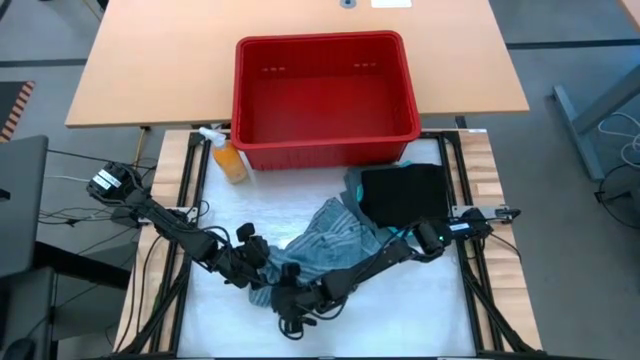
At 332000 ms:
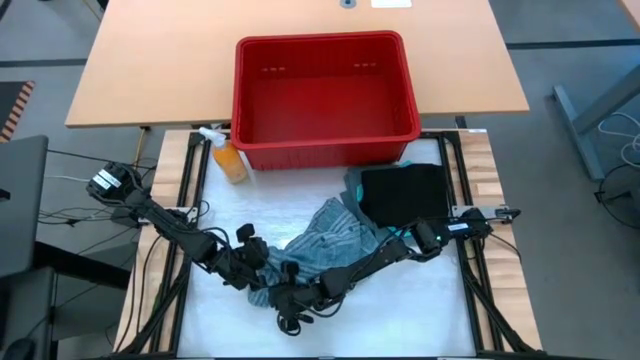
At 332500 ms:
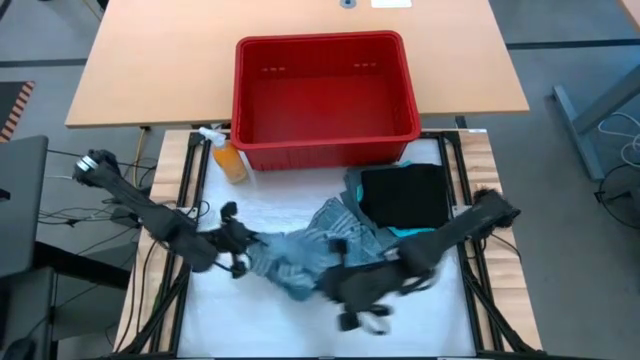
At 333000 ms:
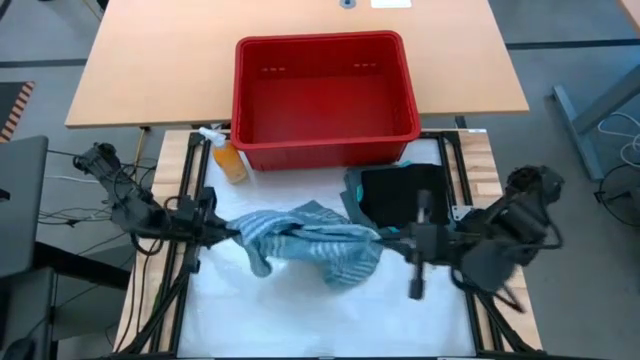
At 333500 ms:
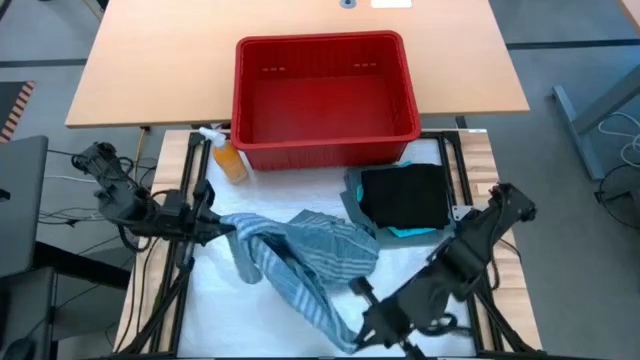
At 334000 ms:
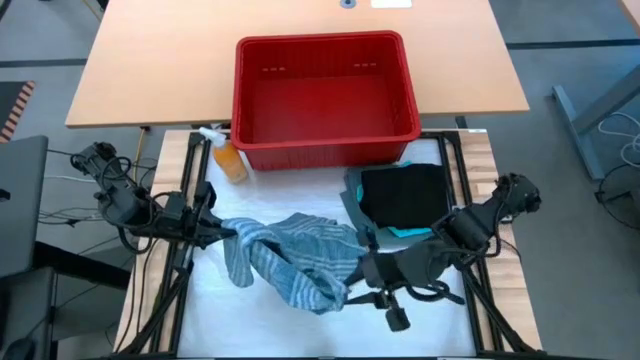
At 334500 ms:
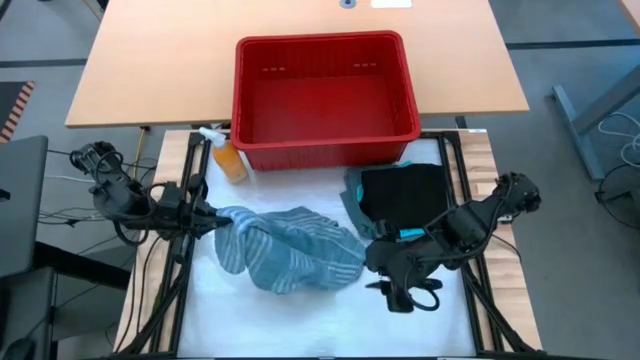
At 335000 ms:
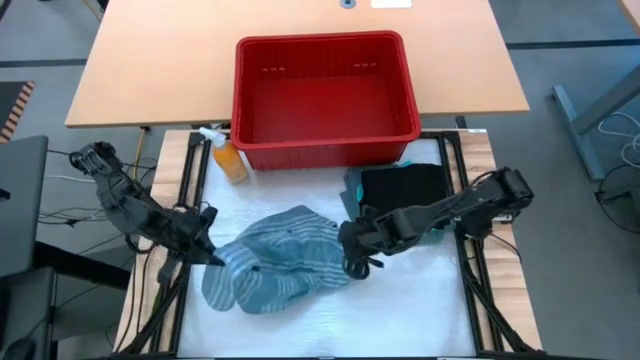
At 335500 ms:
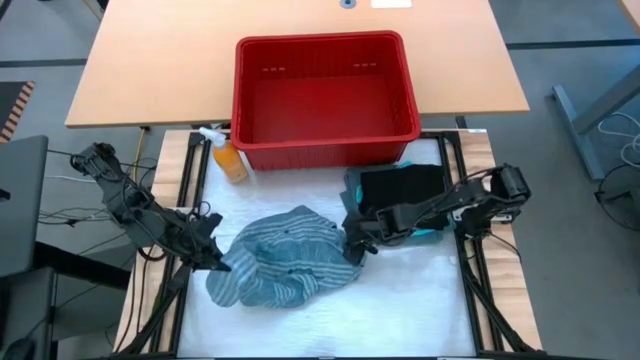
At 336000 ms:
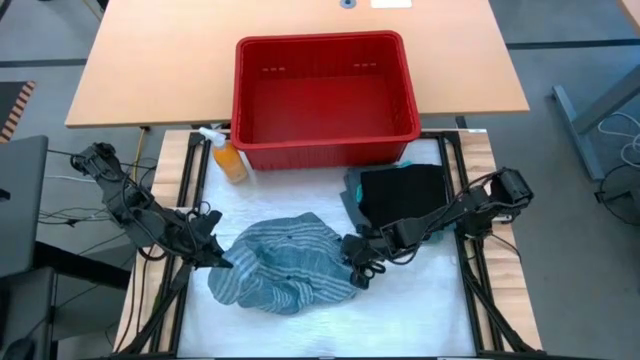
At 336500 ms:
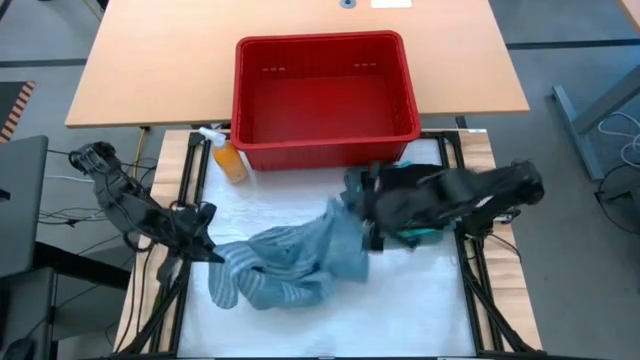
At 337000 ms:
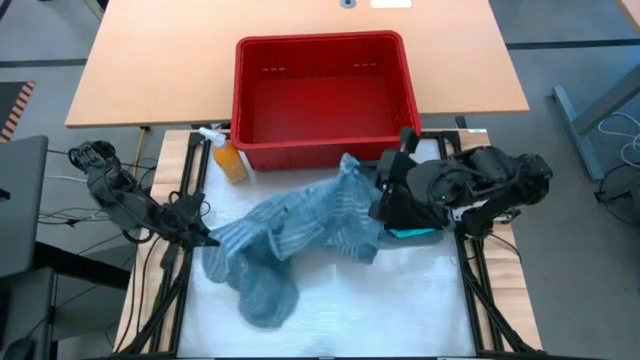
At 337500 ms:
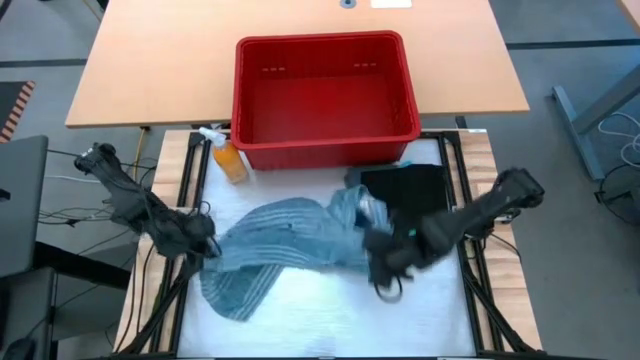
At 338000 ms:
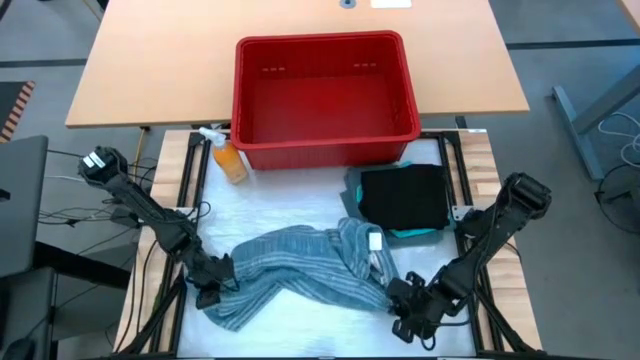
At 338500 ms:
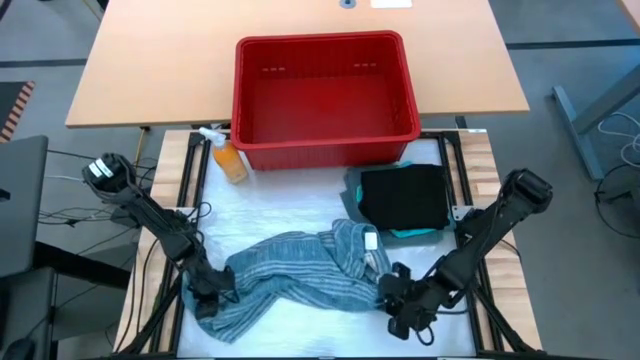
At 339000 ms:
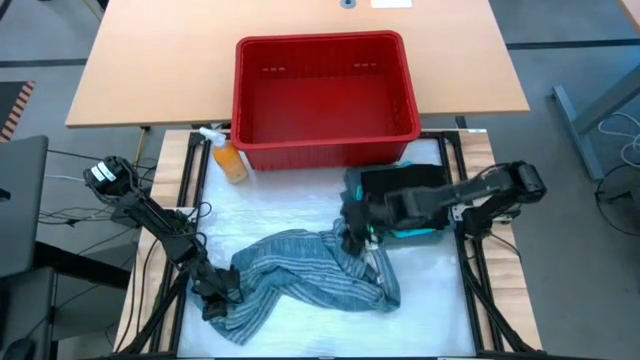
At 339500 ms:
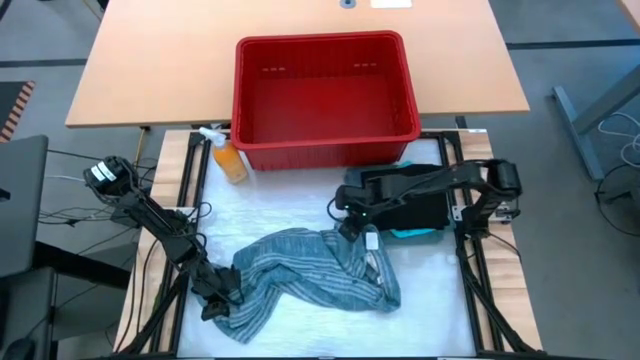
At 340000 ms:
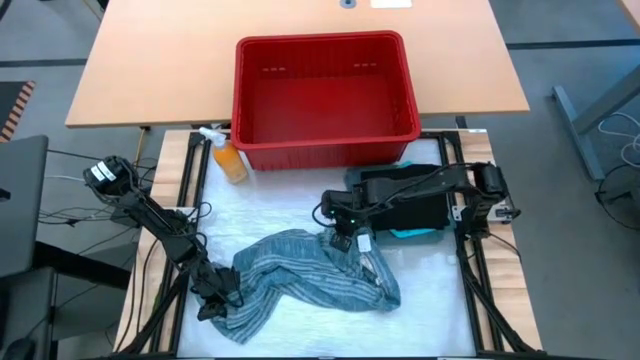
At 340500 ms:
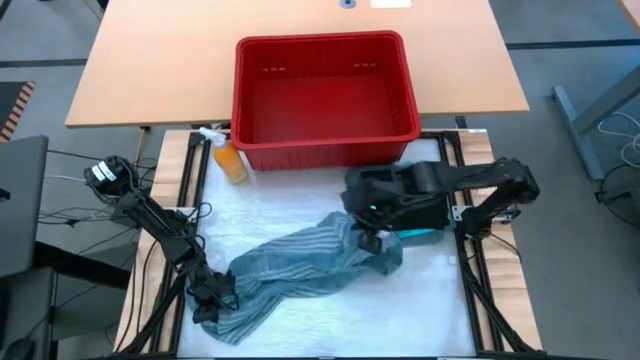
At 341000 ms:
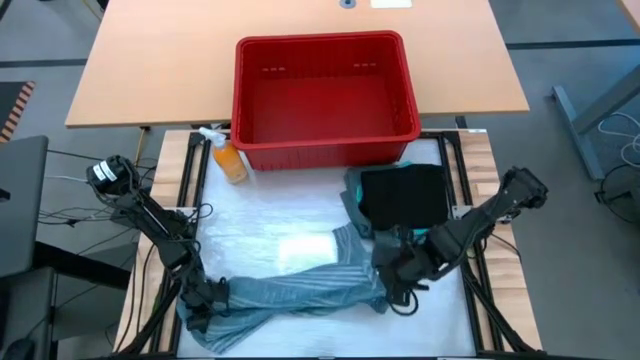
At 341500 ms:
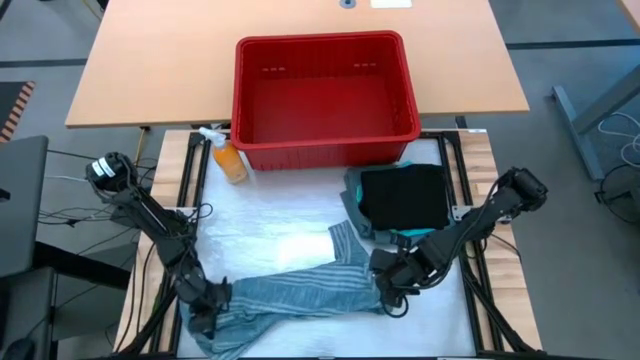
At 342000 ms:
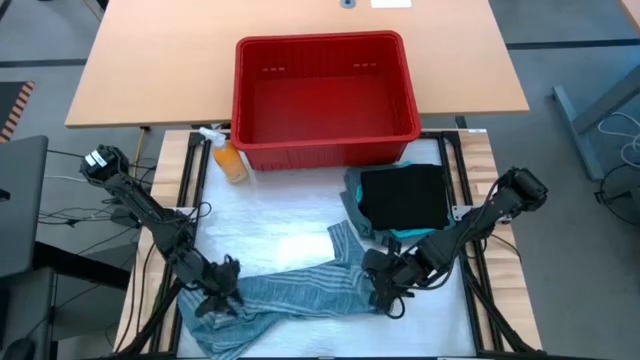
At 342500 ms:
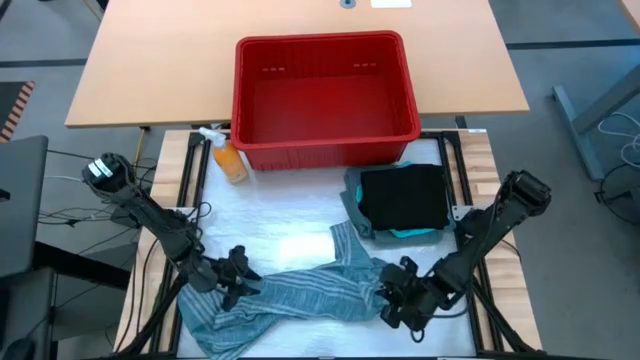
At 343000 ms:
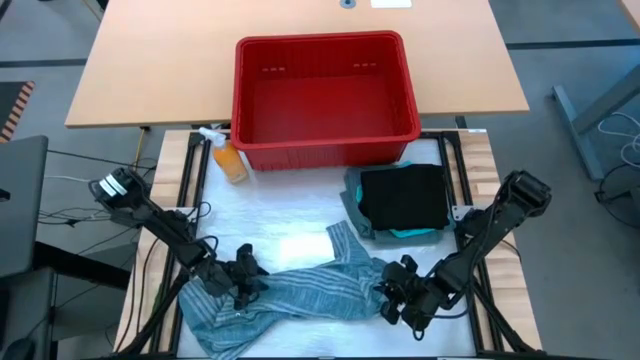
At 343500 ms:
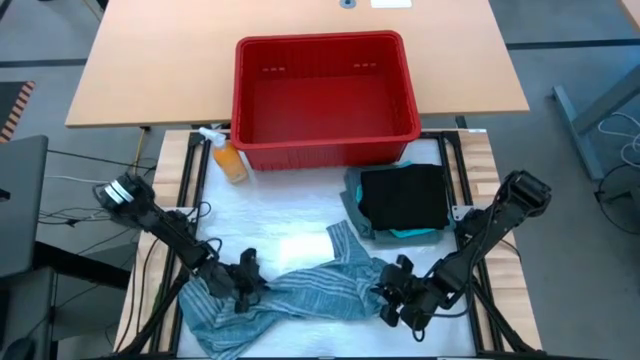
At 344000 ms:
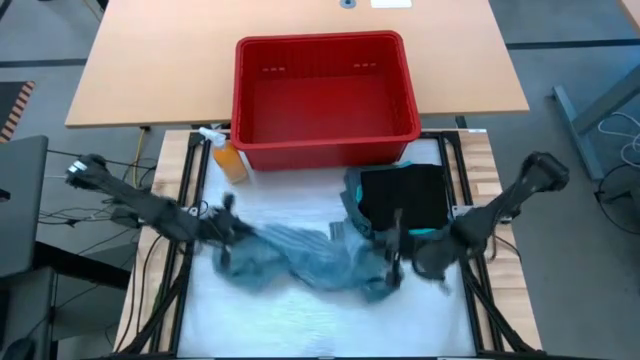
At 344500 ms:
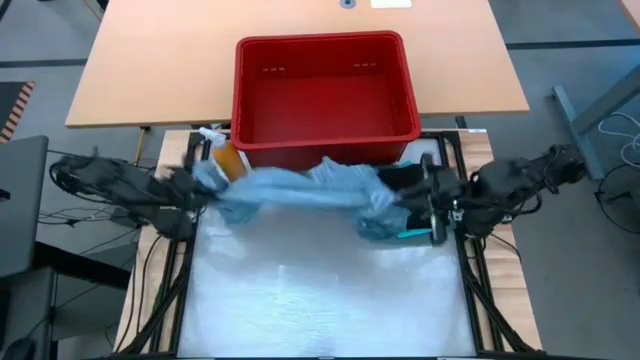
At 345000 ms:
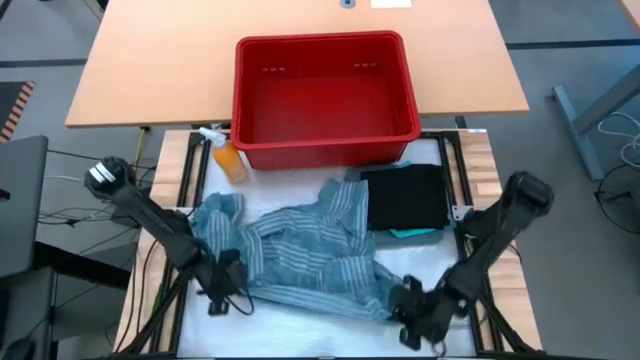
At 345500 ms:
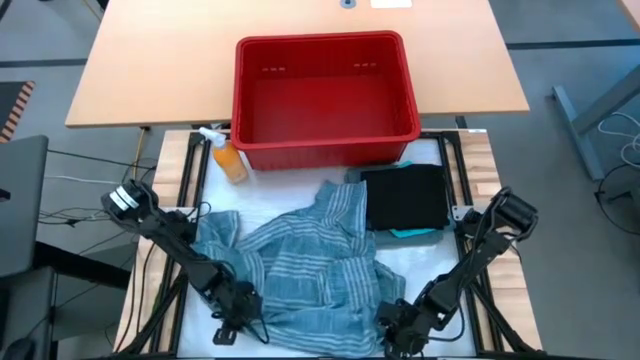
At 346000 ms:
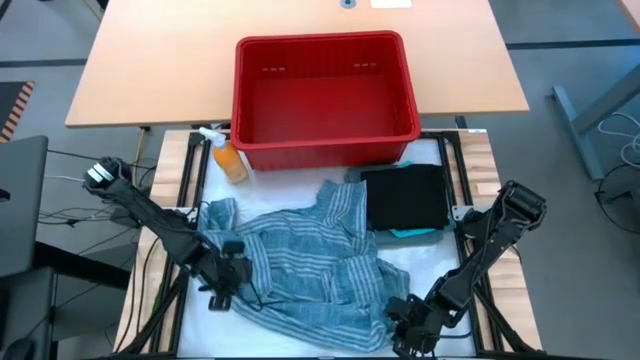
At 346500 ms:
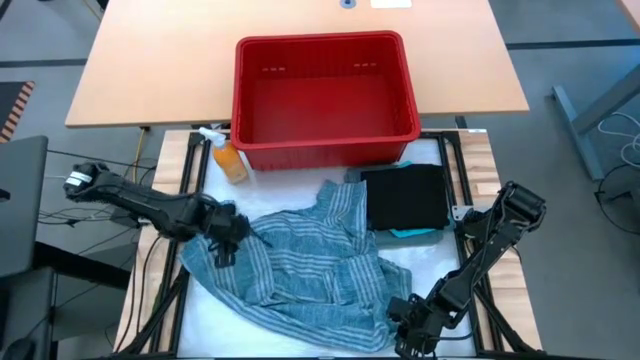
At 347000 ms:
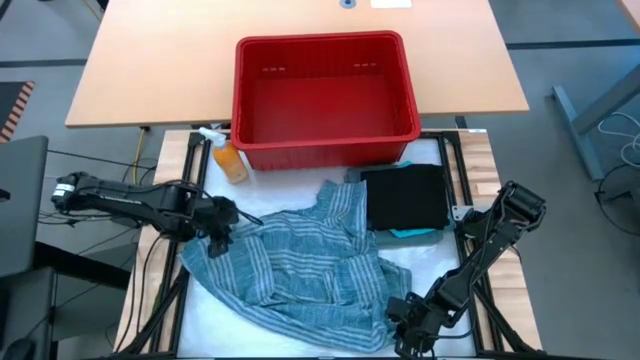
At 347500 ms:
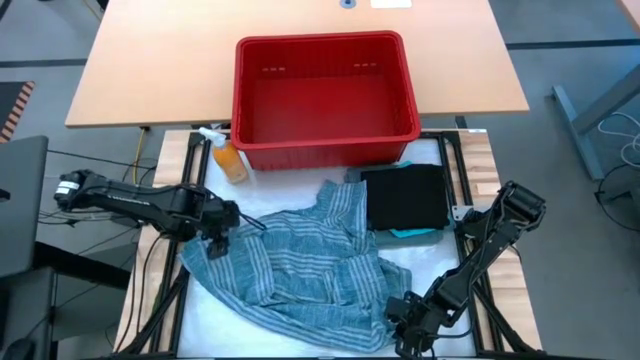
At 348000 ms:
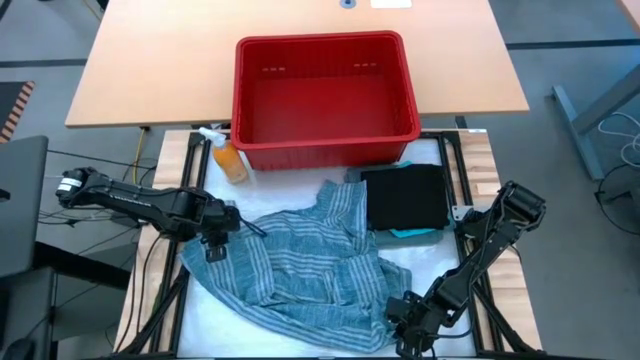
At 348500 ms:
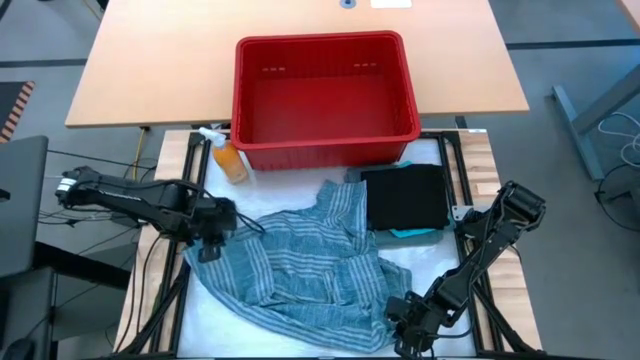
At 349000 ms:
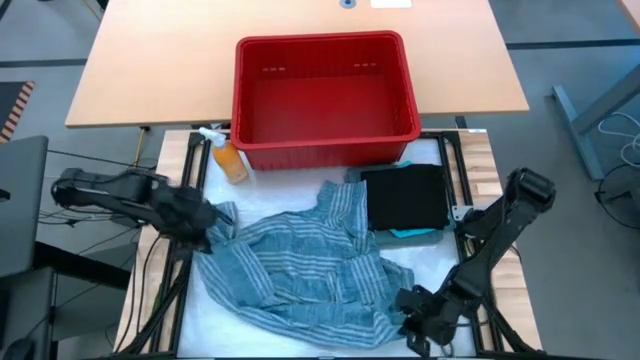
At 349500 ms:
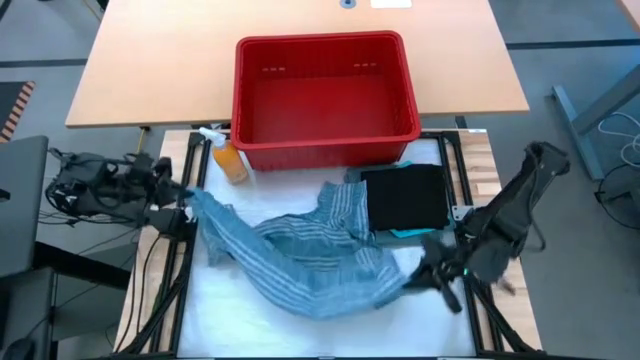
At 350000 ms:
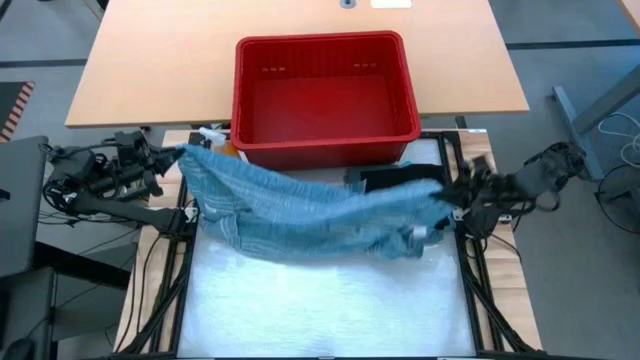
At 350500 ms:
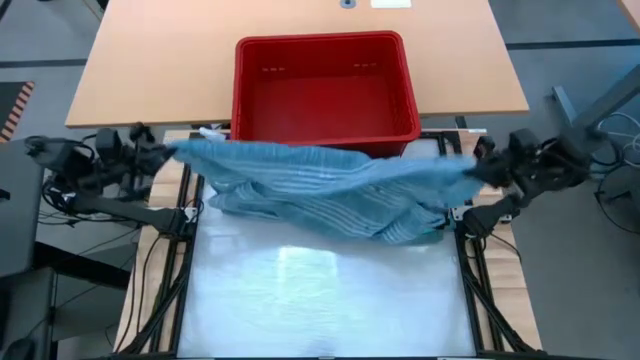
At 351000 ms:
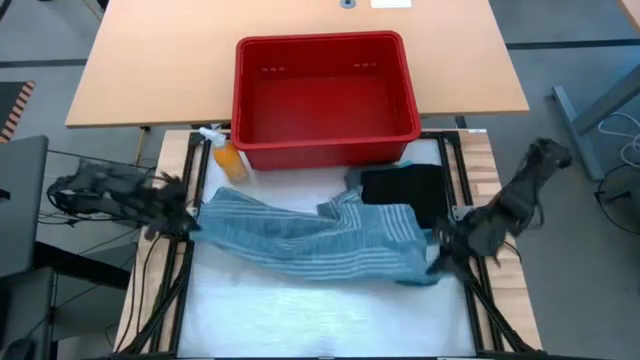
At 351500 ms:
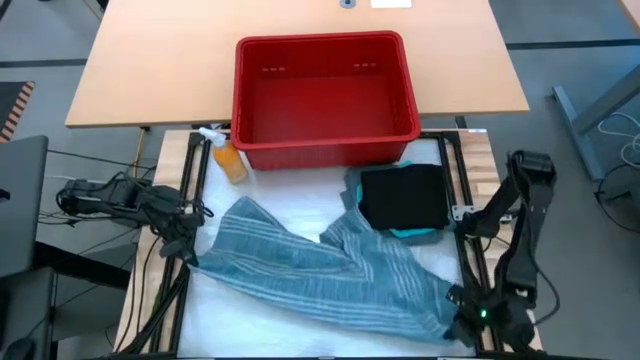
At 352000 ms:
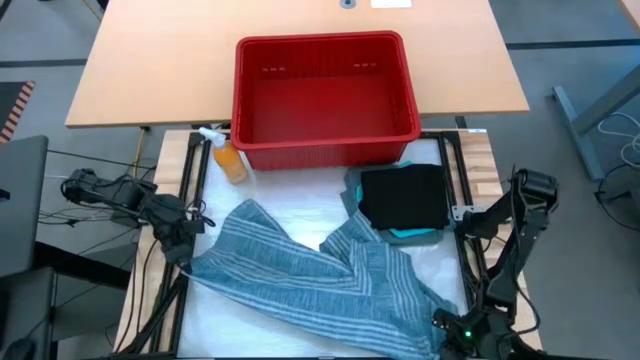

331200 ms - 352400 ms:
Task: Fold Laundry from Bin
Fold the blue patterned polo
